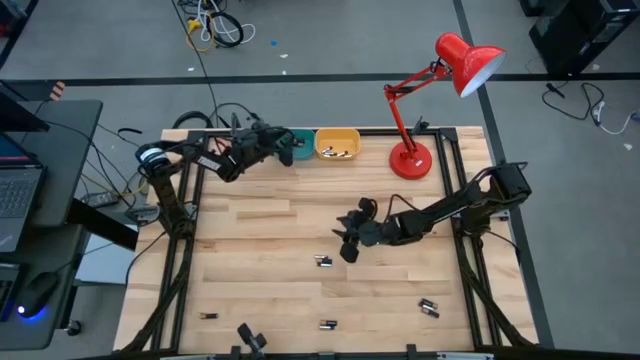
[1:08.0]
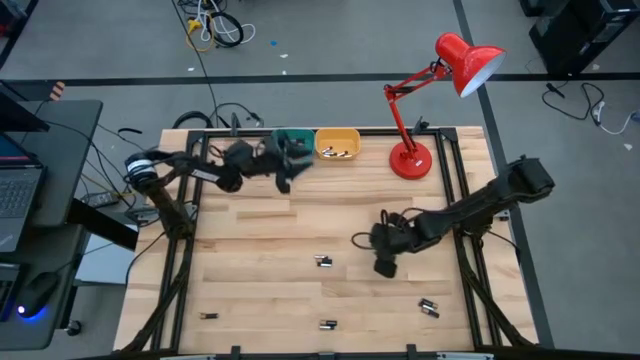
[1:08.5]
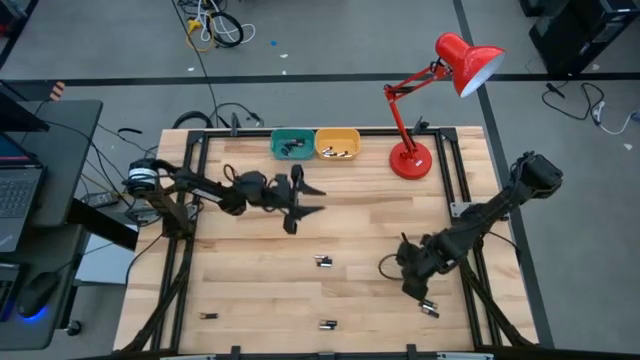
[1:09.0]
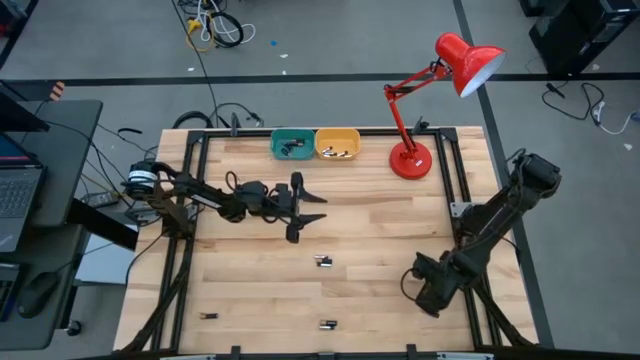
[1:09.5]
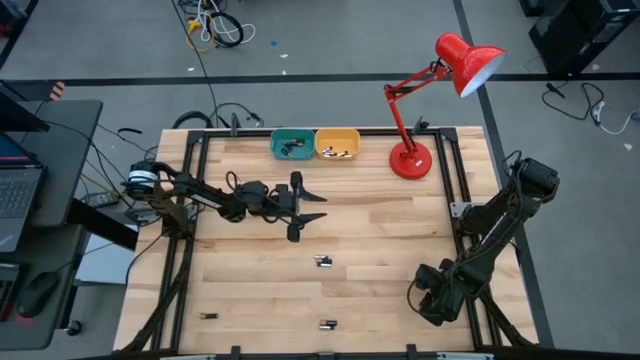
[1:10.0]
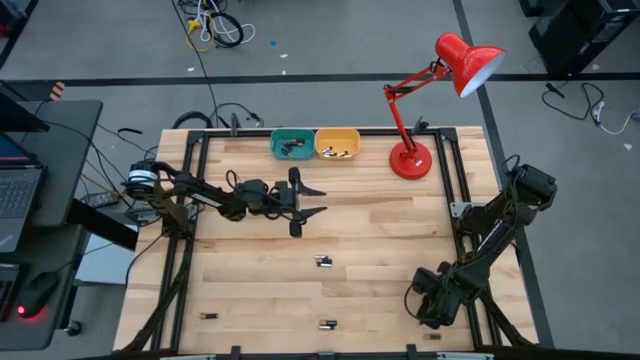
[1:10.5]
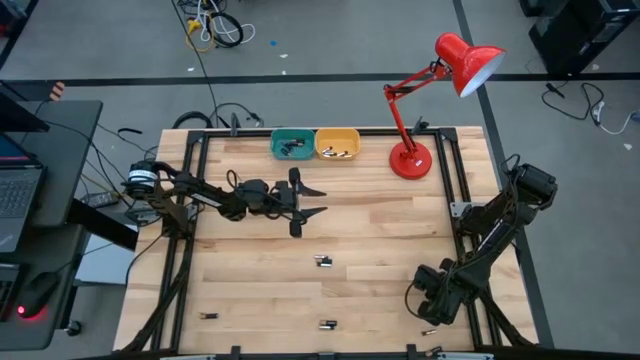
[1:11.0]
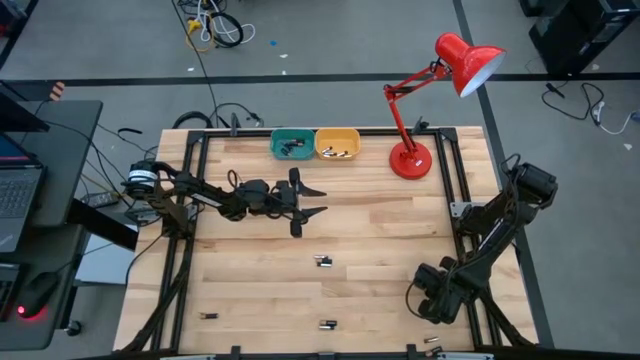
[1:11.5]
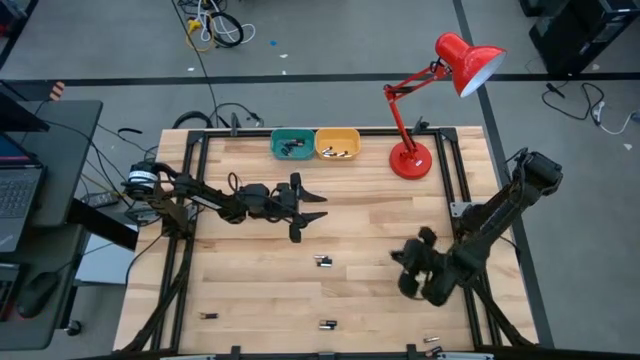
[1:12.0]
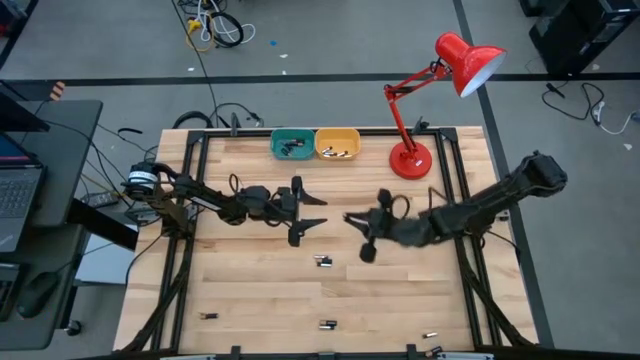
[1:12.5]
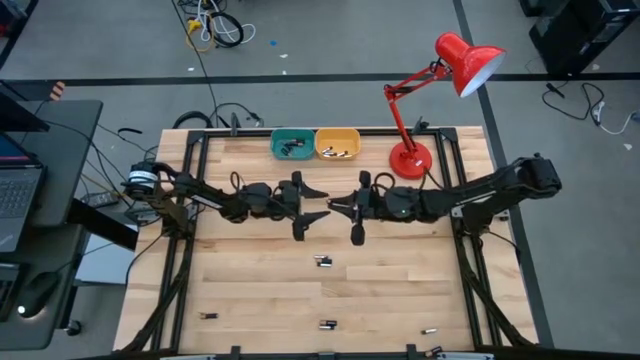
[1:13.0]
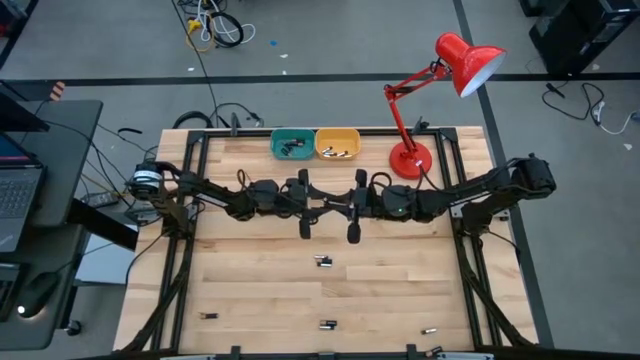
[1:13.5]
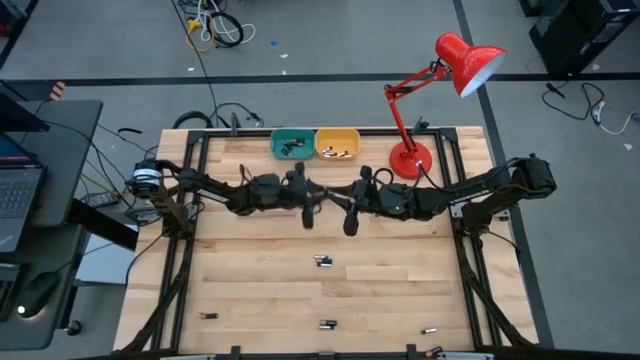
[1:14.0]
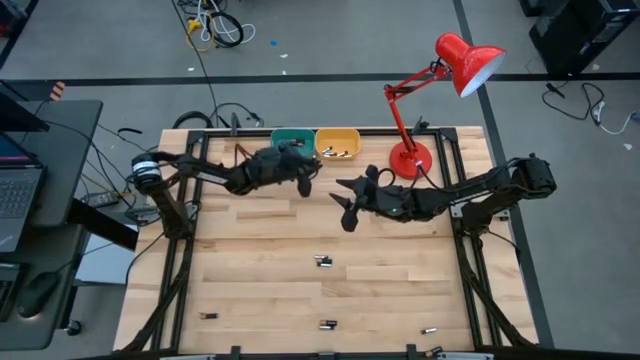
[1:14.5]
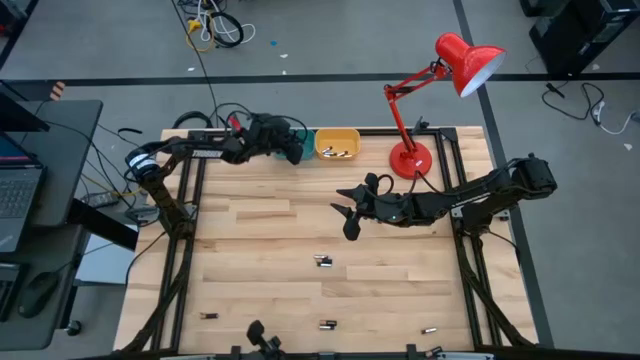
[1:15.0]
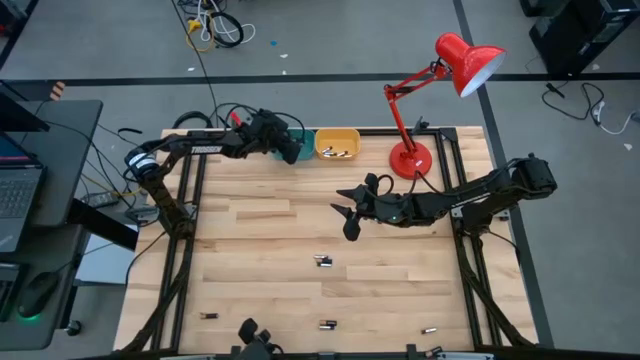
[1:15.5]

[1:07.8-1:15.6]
Task: Sort batteries
Put the black battery into the blue bin

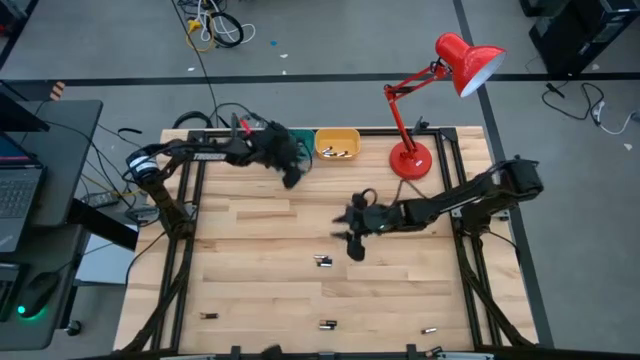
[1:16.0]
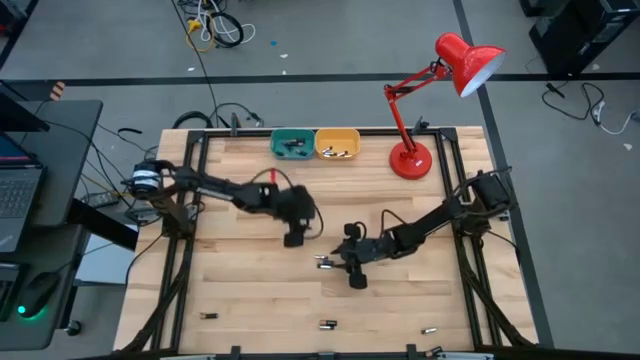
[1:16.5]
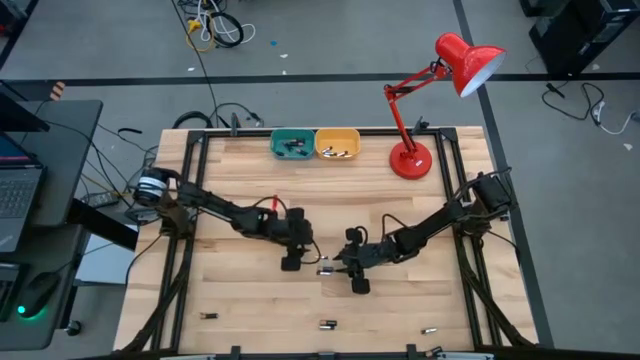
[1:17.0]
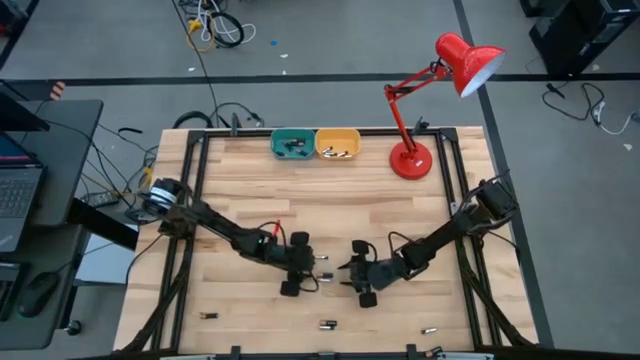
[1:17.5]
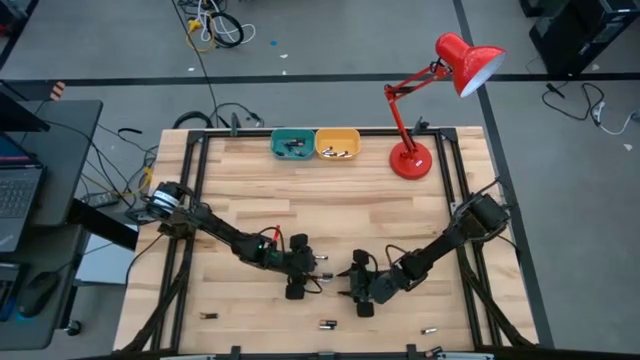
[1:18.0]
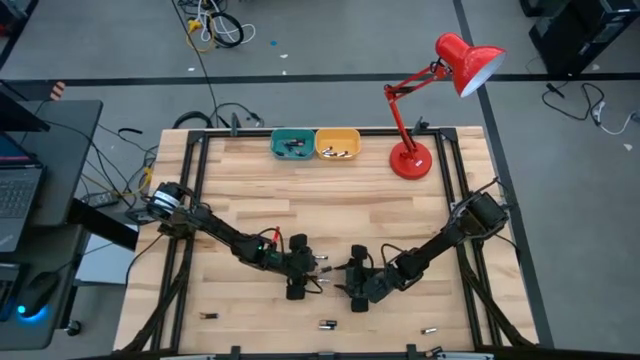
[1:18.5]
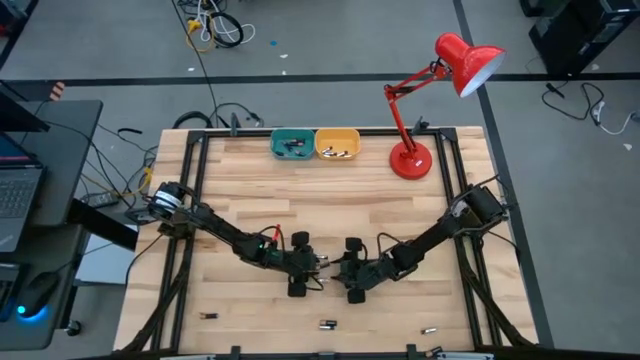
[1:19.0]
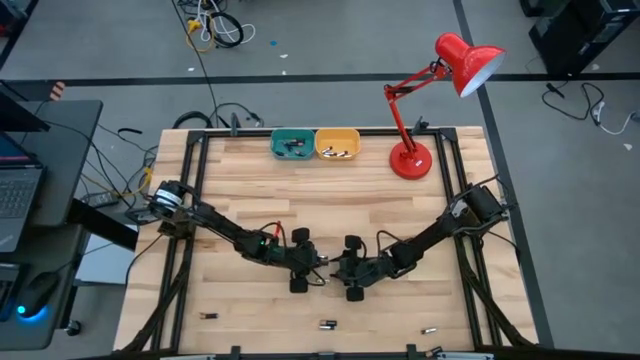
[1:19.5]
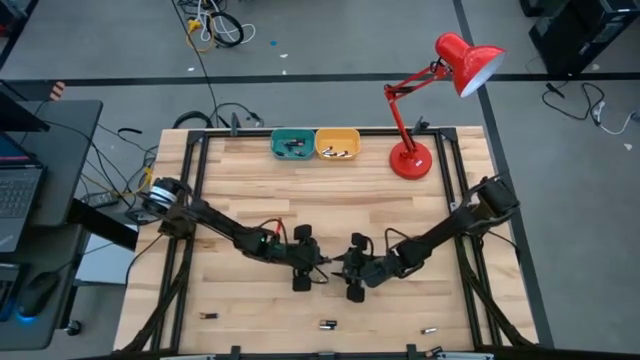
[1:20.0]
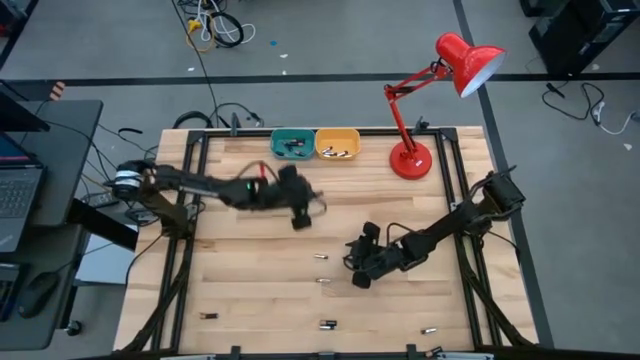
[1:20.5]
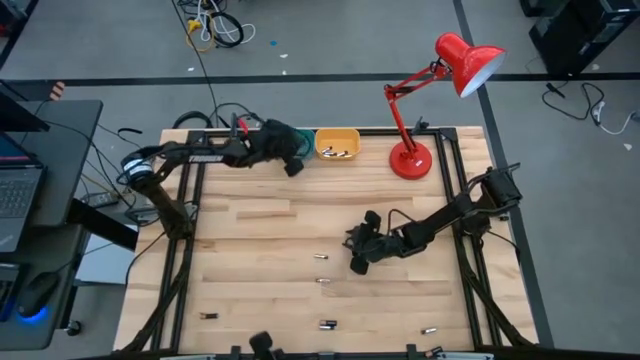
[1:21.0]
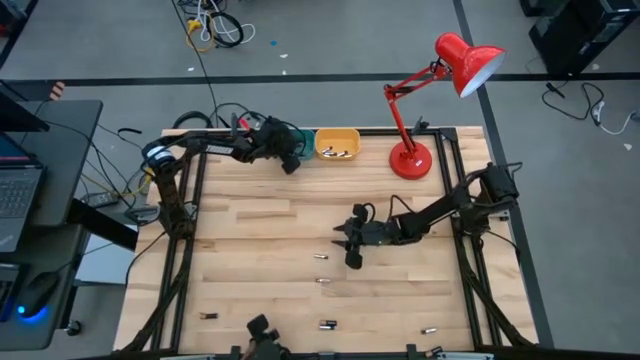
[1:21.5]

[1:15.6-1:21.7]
Put the black battery into the blue bin

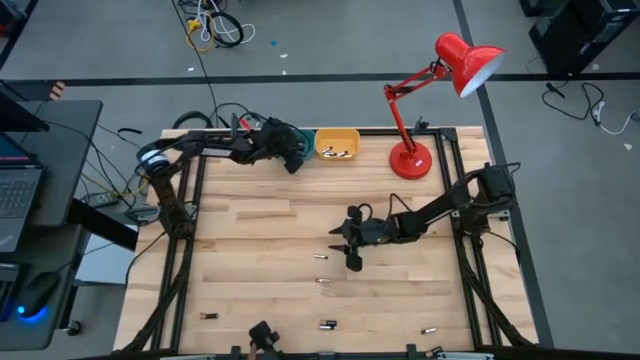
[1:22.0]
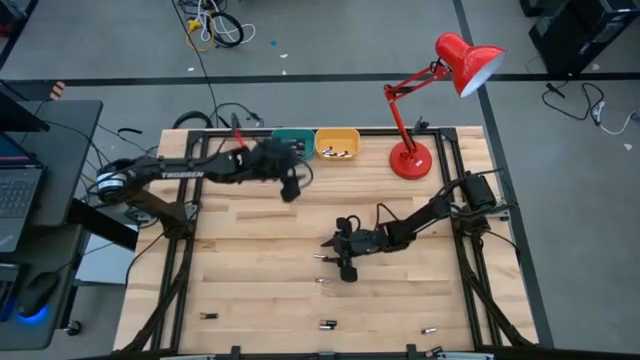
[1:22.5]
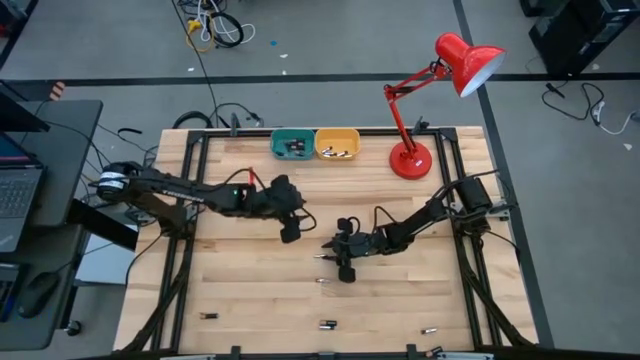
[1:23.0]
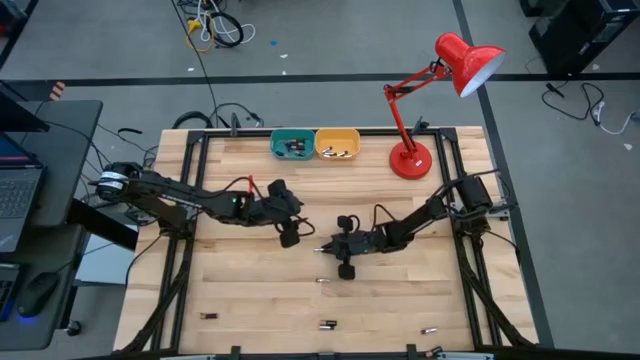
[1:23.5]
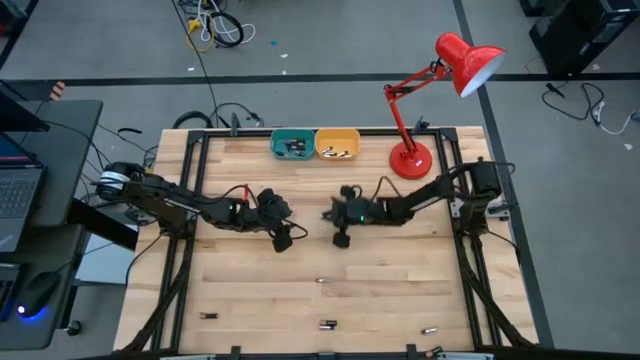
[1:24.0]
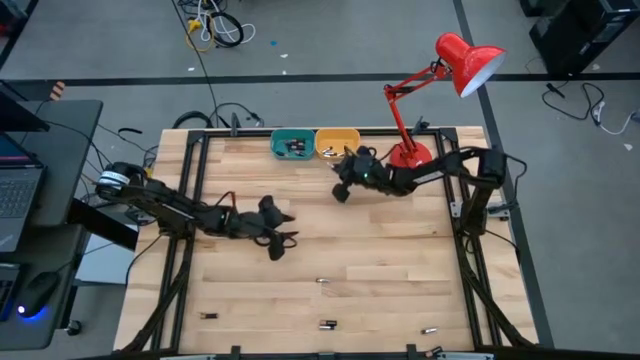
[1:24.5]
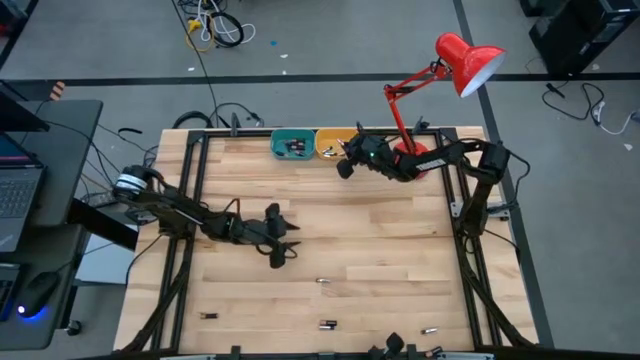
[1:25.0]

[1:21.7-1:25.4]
Put the white battery into the yellow bin

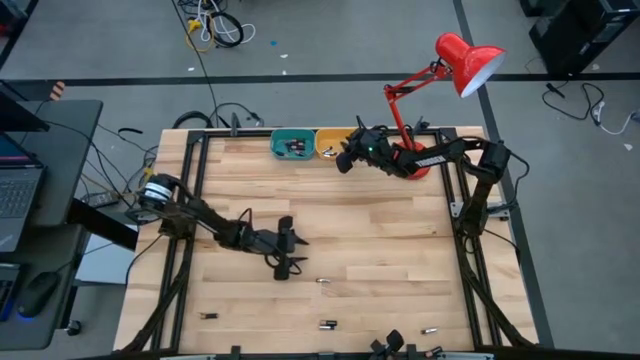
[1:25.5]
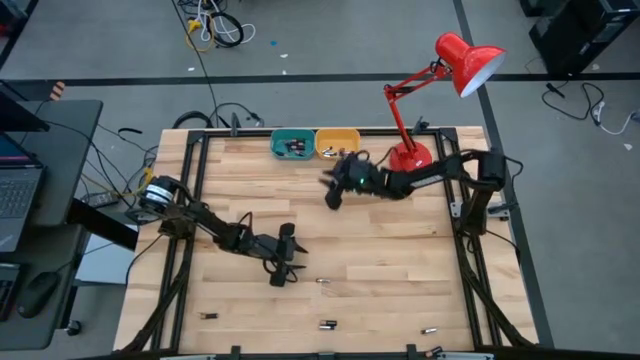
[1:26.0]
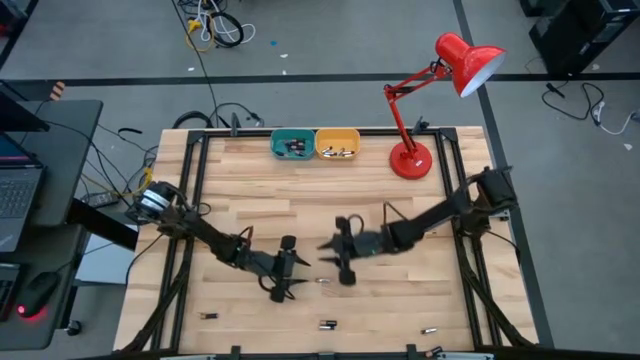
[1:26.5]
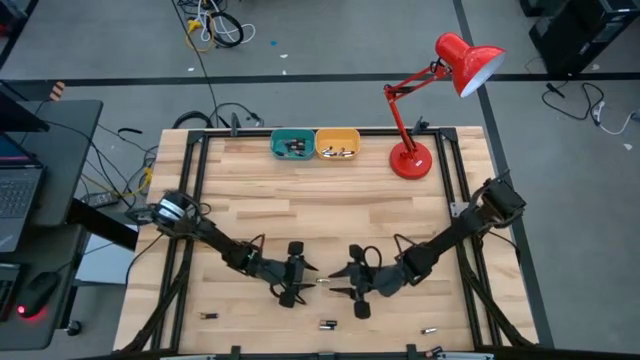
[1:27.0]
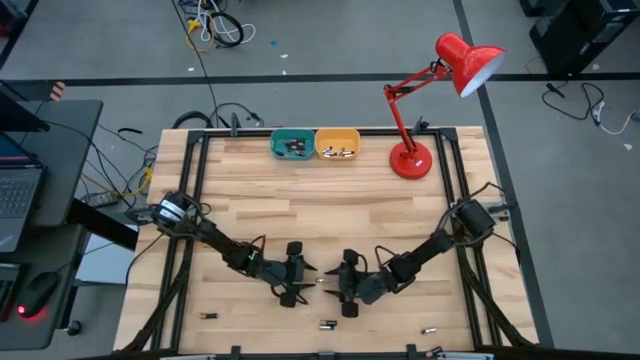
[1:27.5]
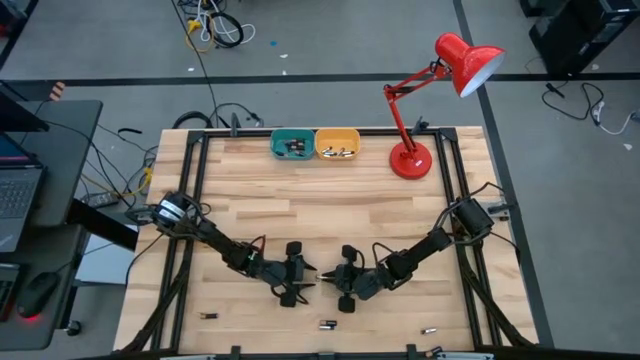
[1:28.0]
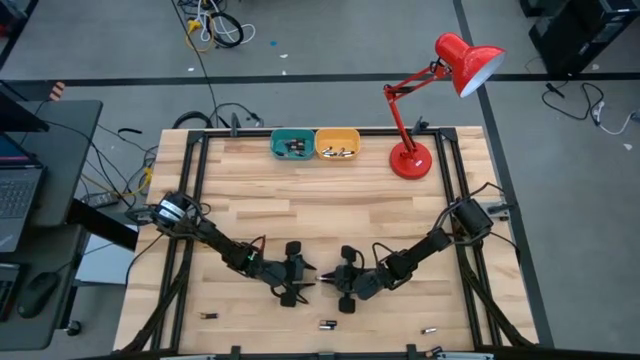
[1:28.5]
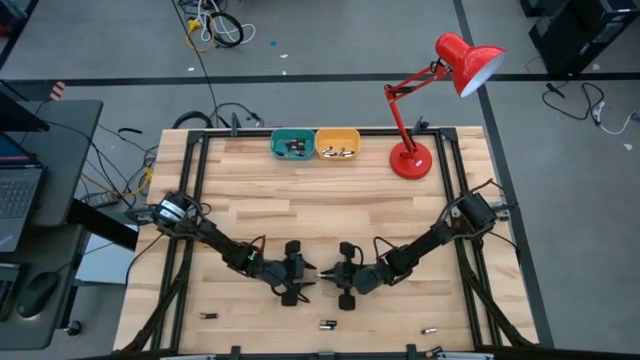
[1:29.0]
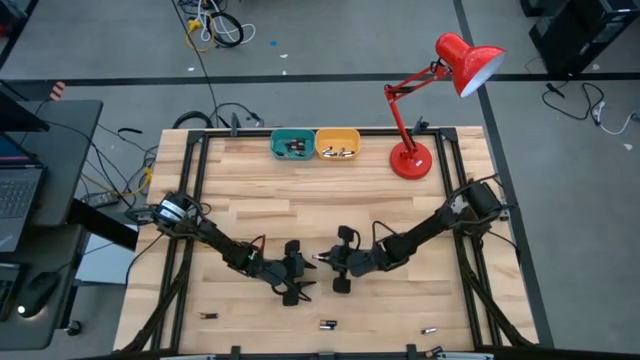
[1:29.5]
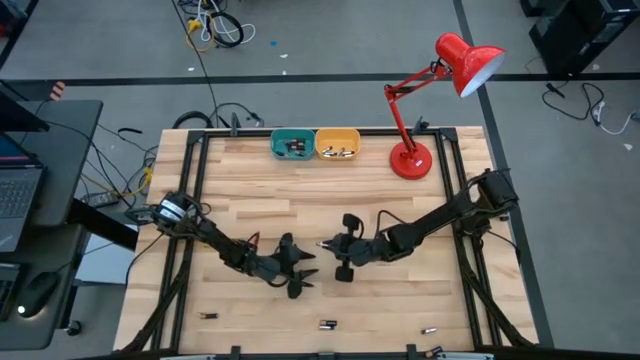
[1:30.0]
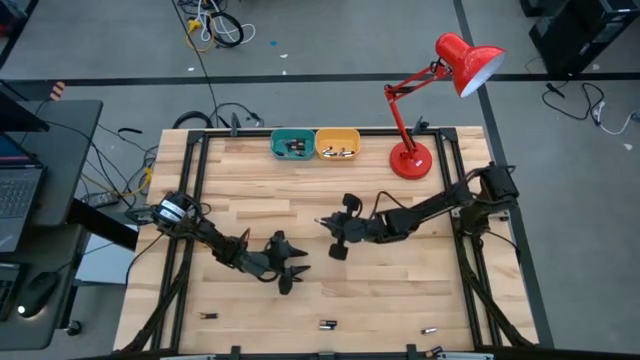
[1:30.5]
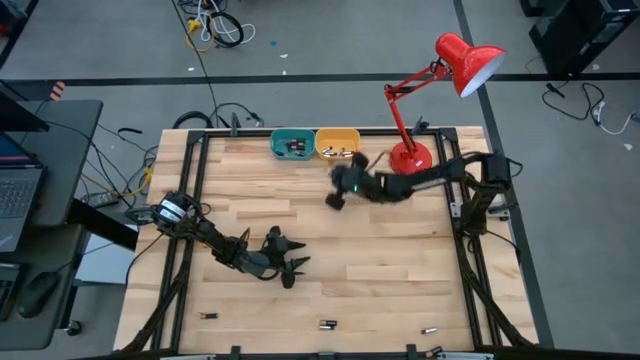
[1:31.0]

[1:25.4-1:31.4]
Put the white battery into the yellow bin
